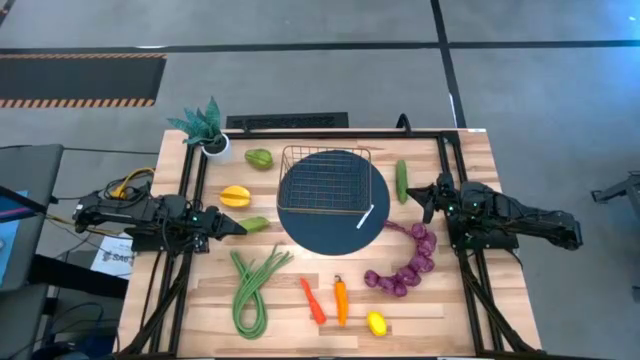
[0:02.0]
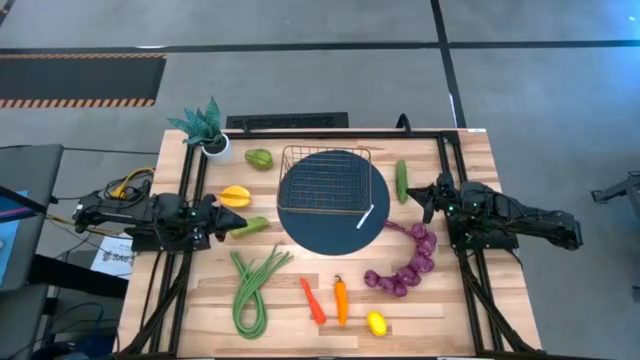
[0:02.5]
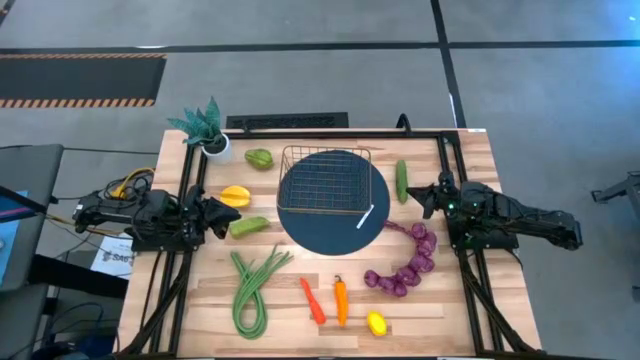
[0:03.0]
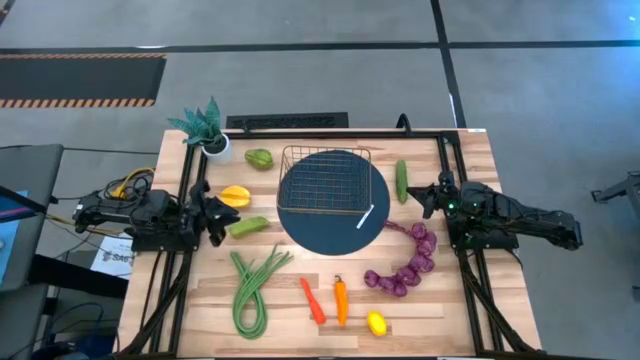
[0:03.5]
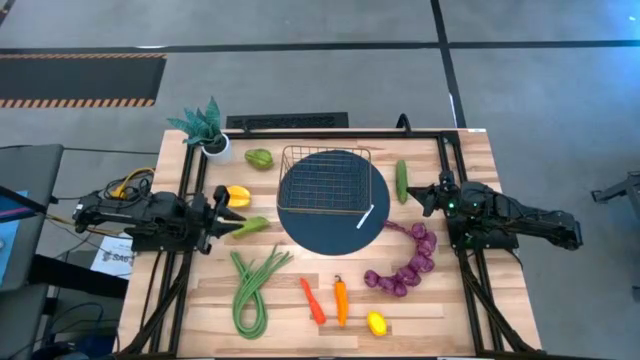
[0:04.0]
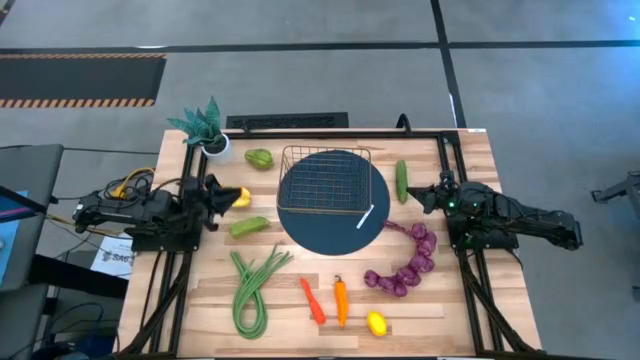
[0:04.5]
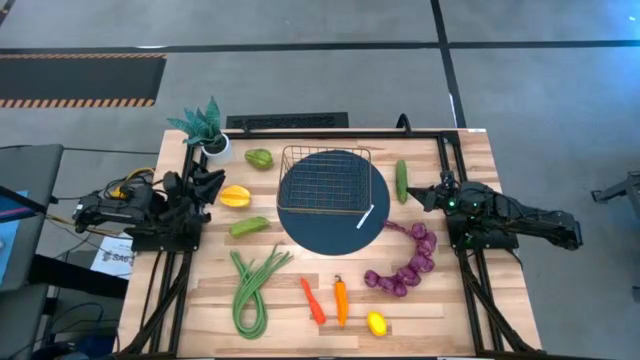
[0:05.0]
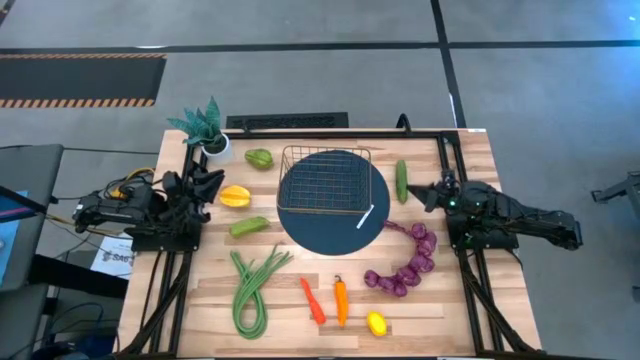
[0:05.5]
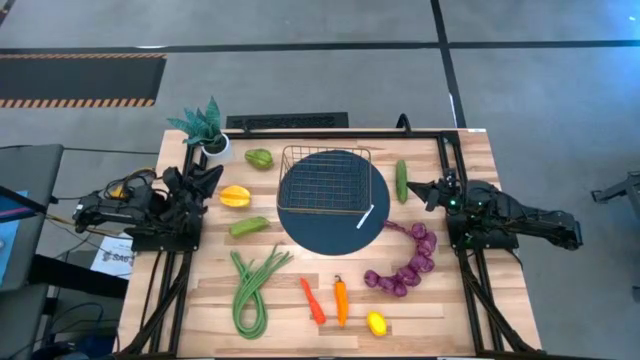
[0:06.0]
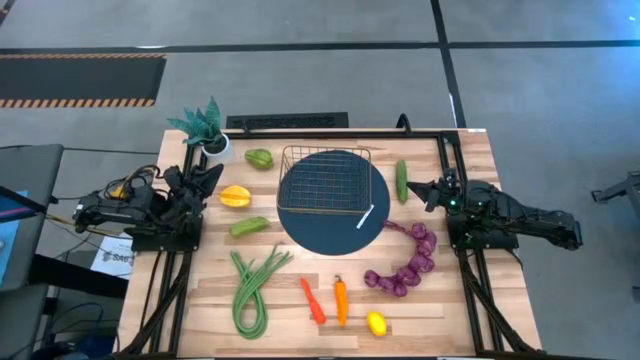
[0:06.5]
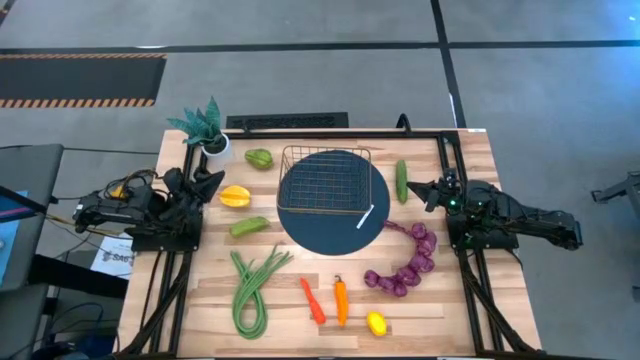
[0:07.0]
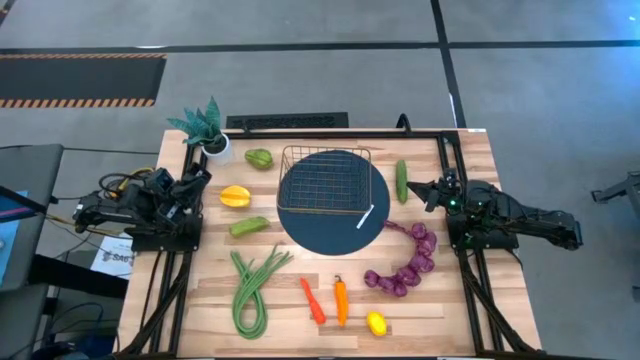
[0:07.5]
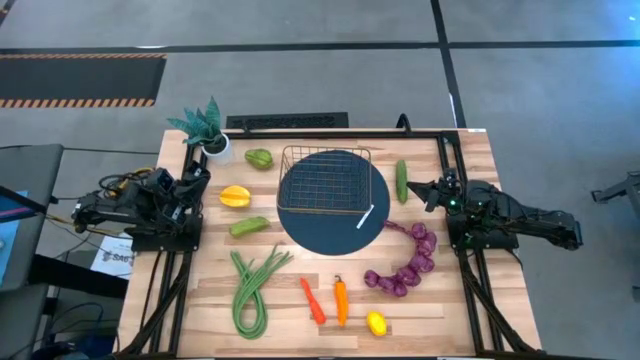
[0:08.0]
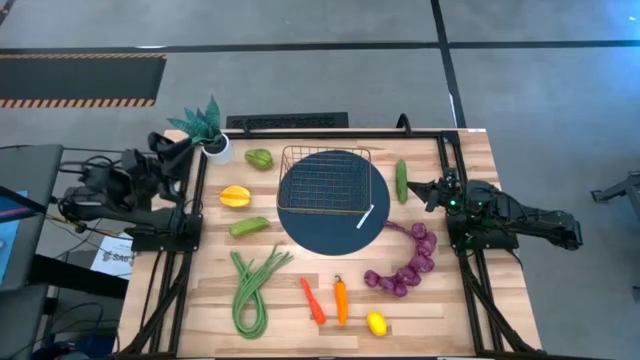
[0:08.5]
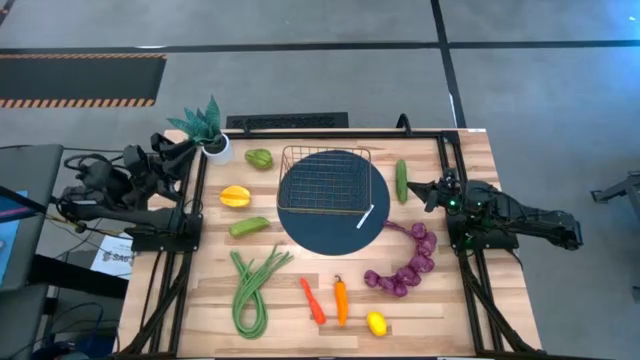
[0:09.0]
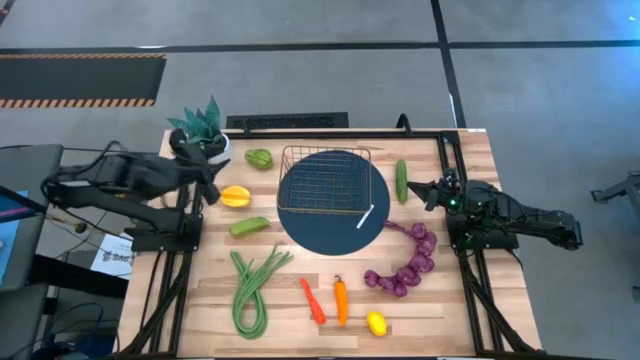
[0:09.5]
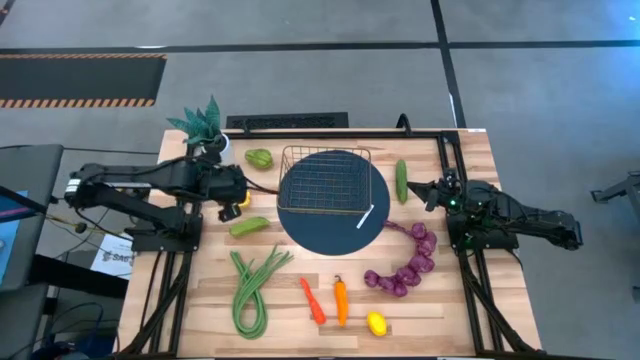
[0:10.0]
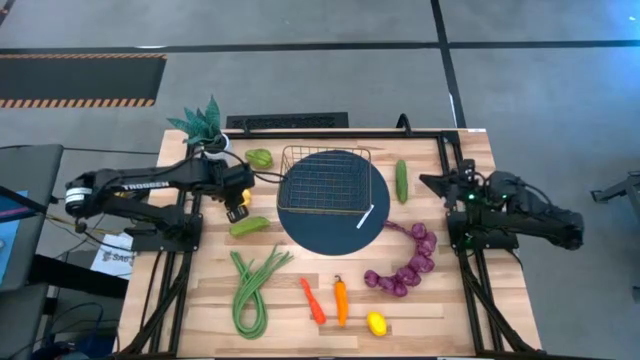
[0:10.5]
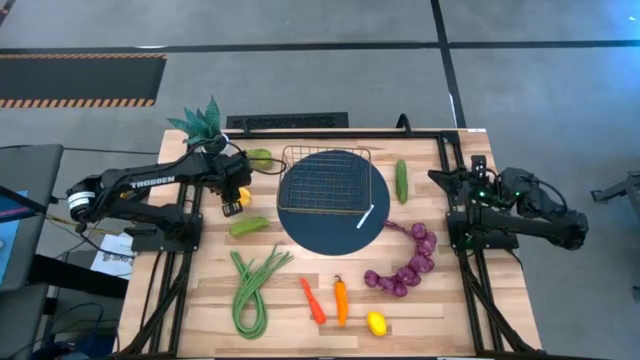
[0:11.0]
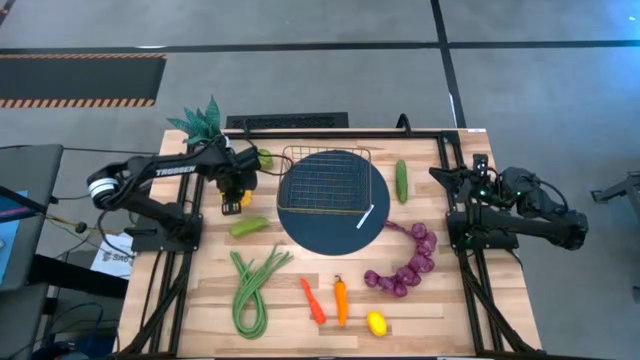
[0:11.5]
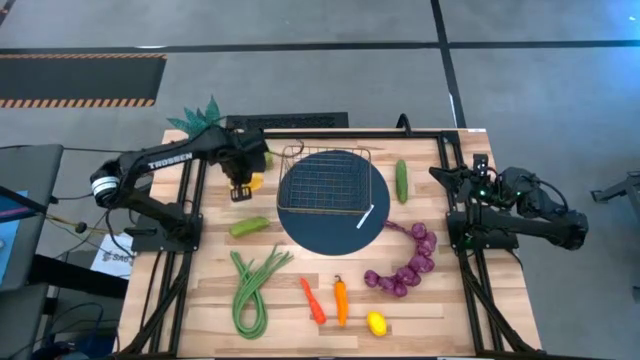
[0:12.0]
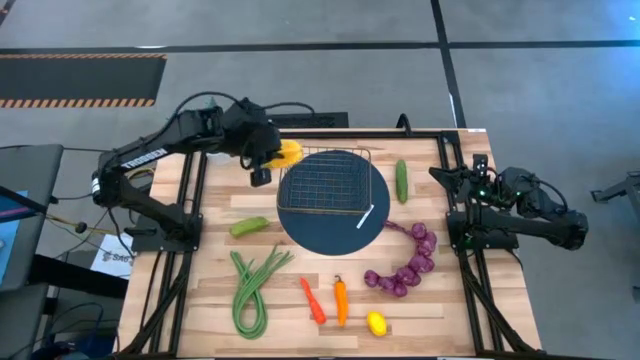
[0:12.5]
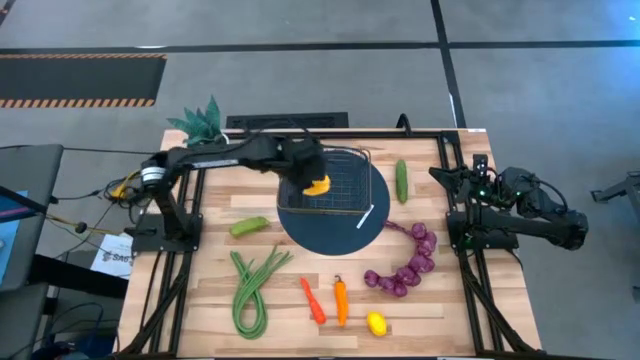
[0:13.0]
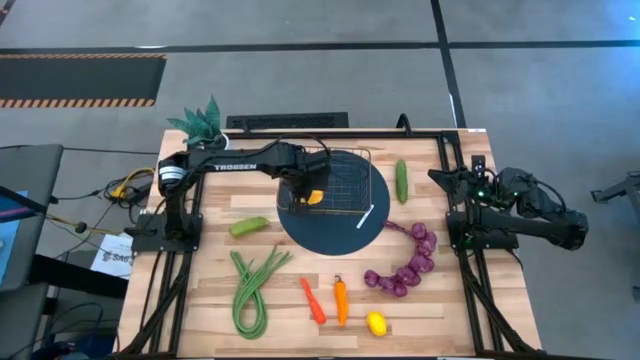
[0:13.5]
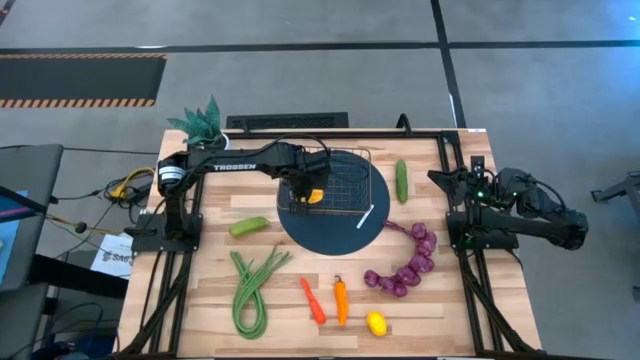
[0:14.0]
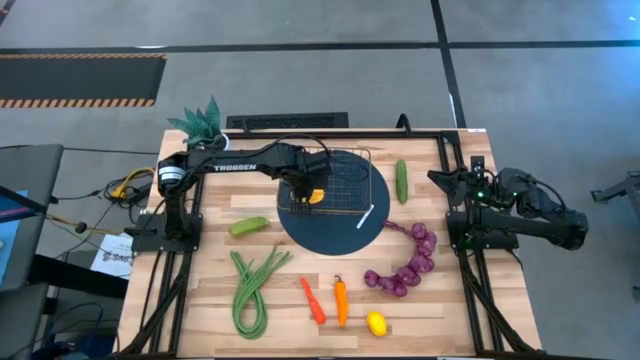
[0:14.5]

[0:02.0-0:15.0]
Task: Build produce basket
Put the yellow starfruit into the wire basket

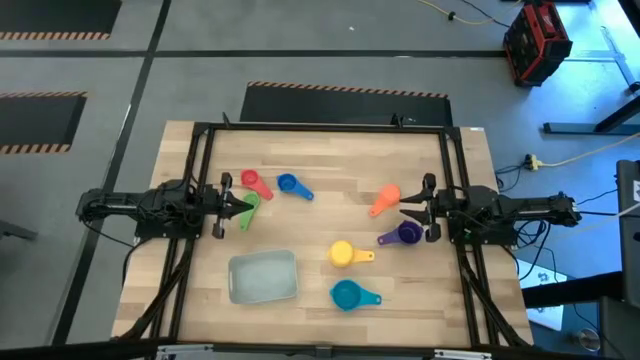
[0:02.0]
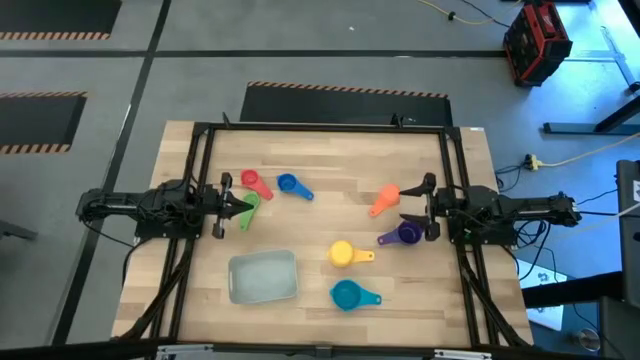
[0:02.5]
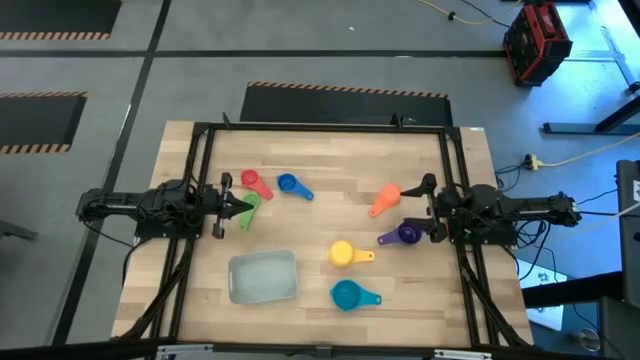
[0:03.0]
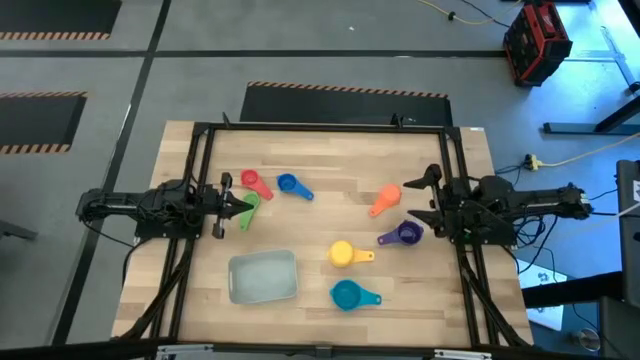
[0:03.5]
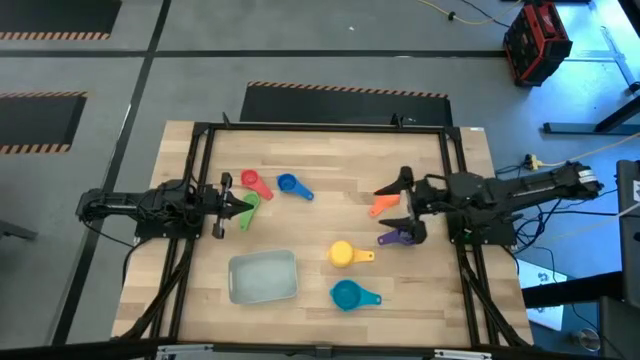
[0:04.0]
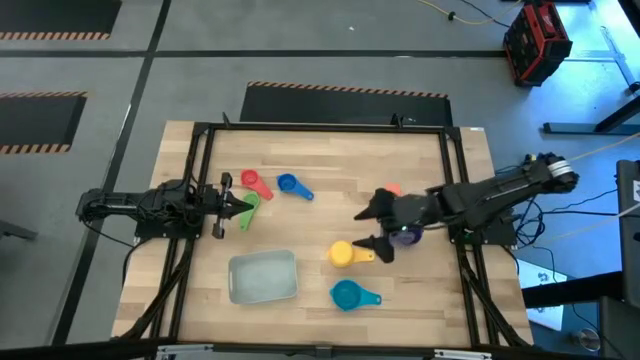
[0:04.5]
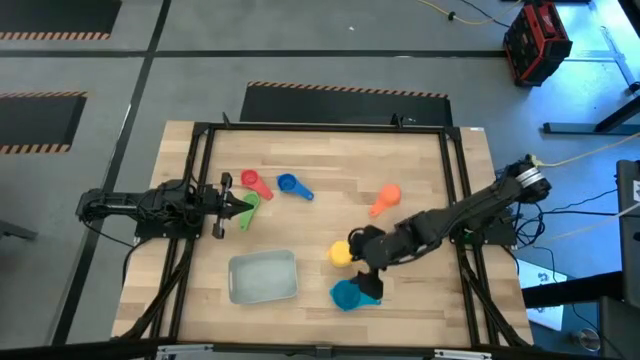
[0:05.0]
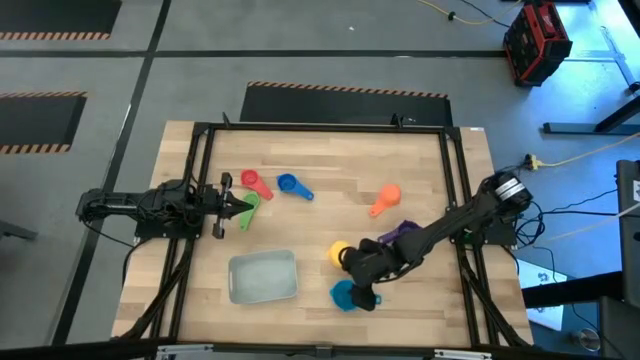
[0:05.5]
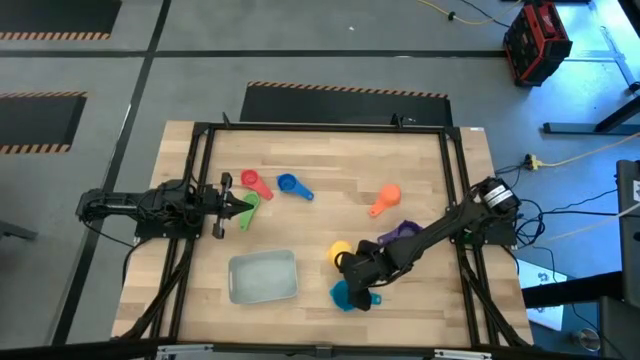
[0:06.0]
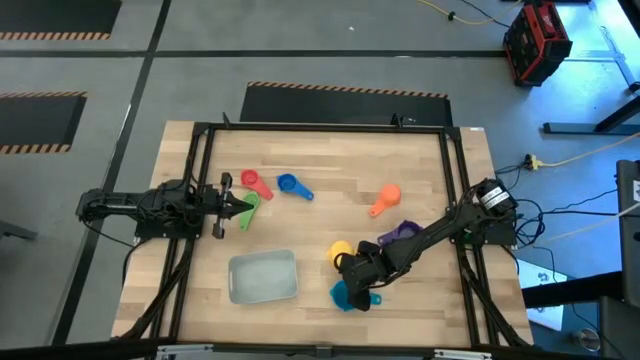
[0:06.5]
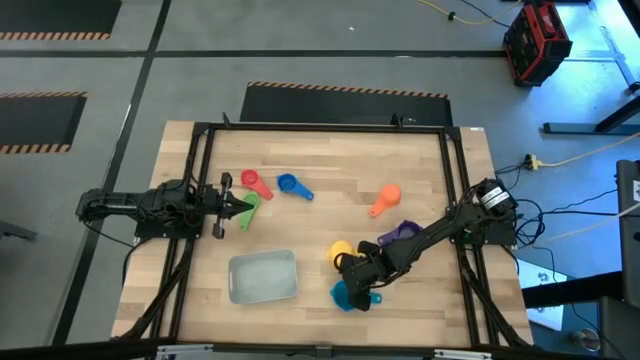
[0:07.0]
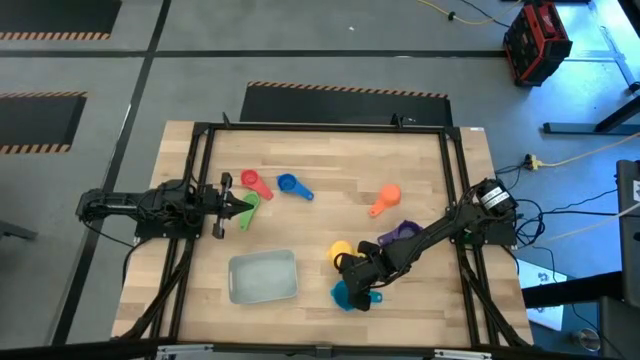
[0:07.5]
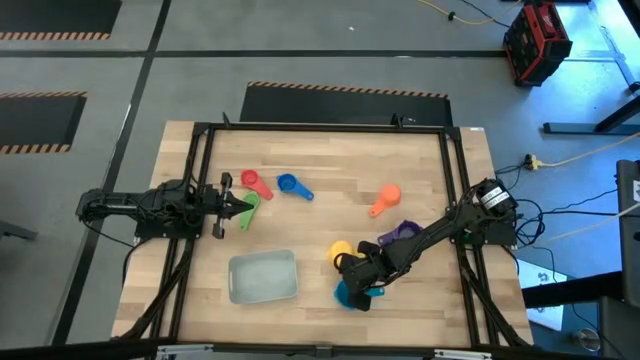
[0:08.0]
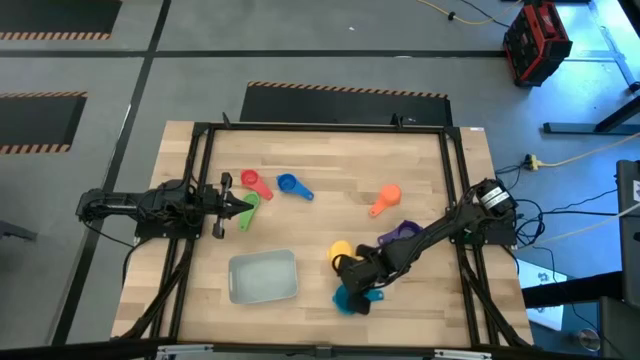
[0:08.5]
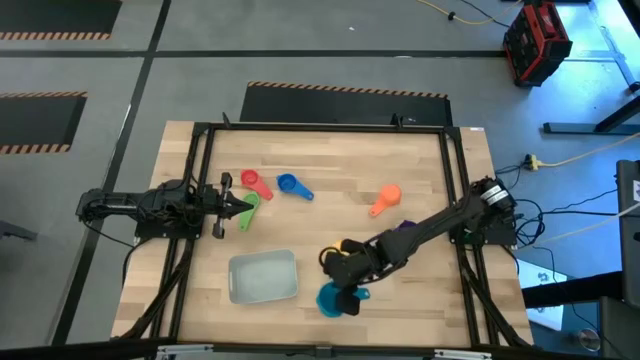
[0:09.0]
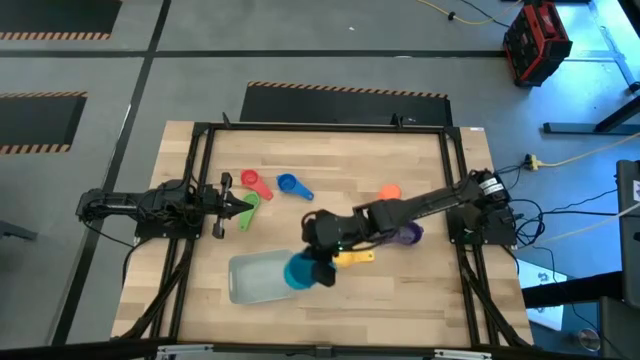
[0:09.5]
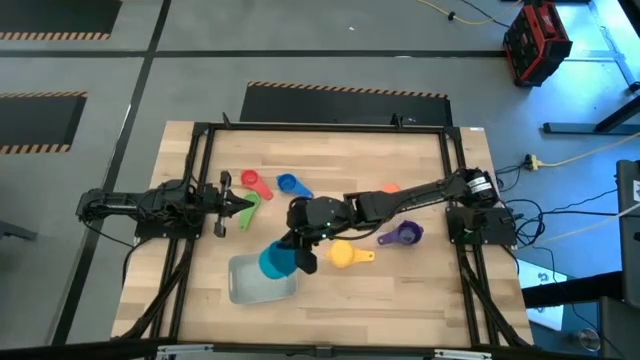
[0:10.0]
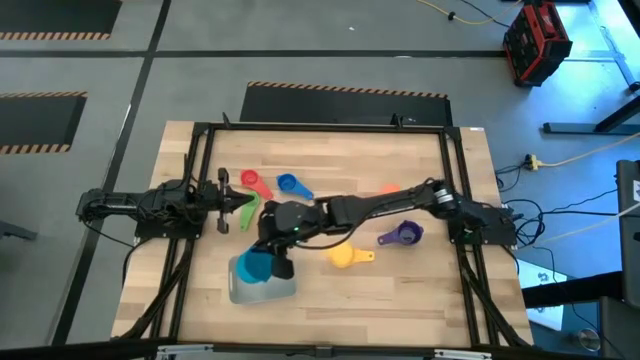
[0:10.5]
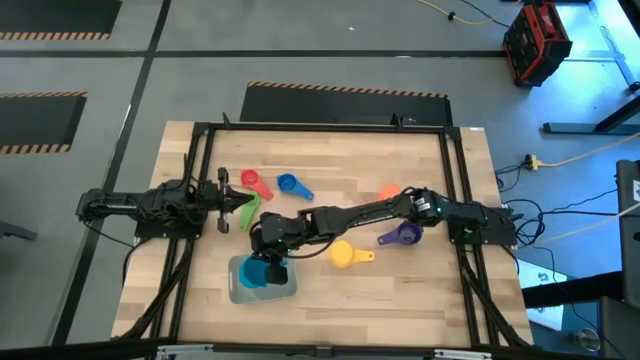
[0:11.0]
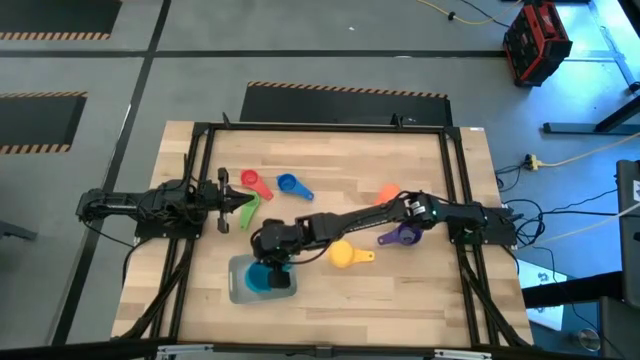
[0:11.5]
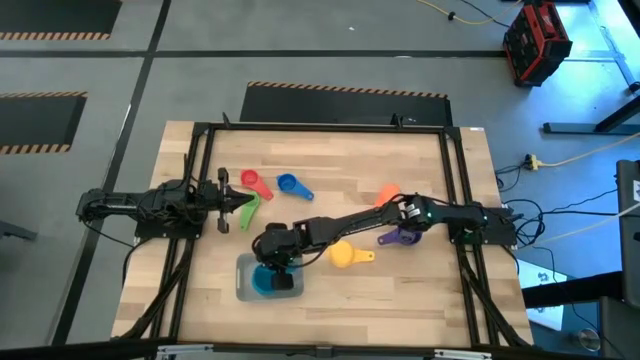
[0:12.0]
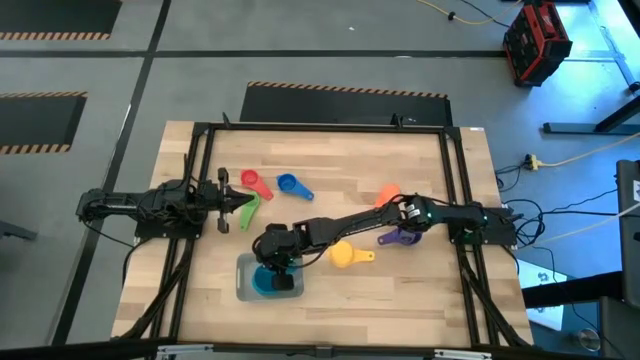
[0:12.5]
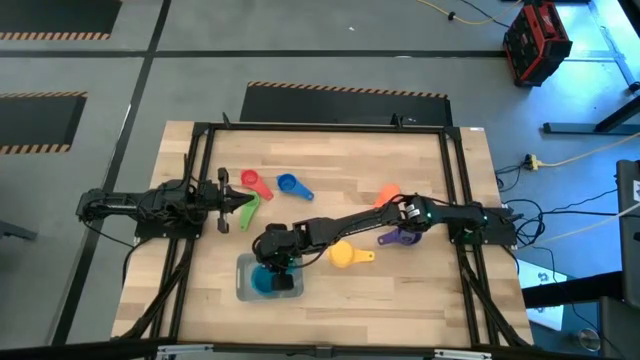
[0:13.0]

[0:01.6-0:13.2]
Task: Nest measuring cups in basket
Put the light blue measuring cup into the grey bin
